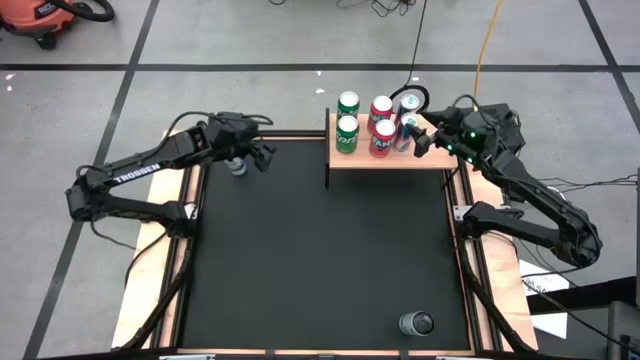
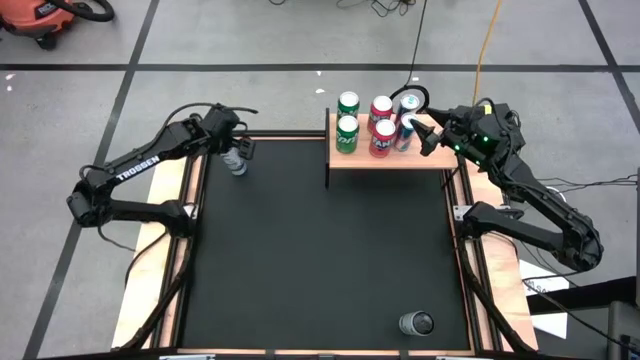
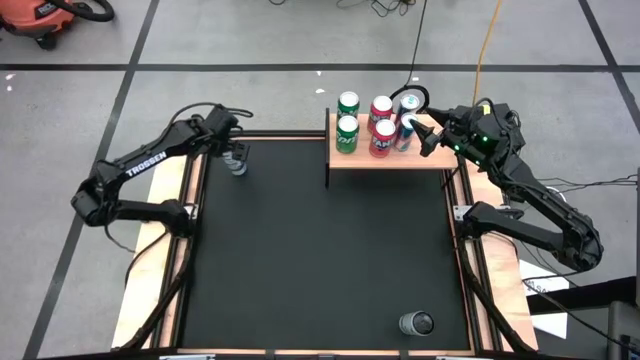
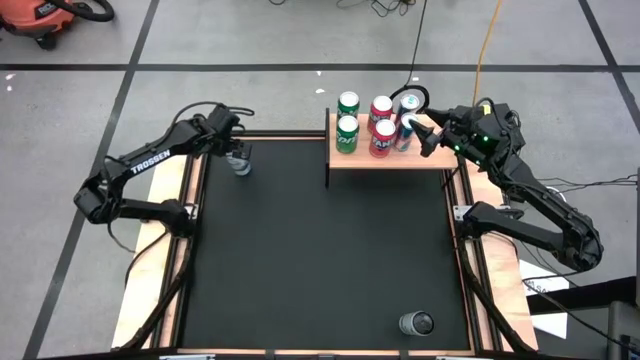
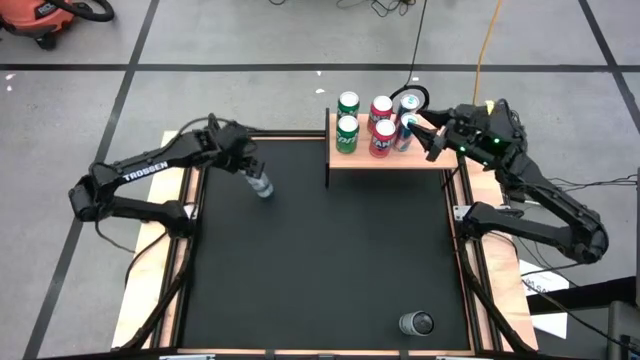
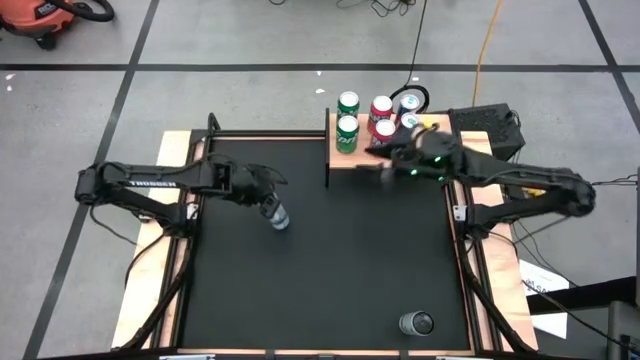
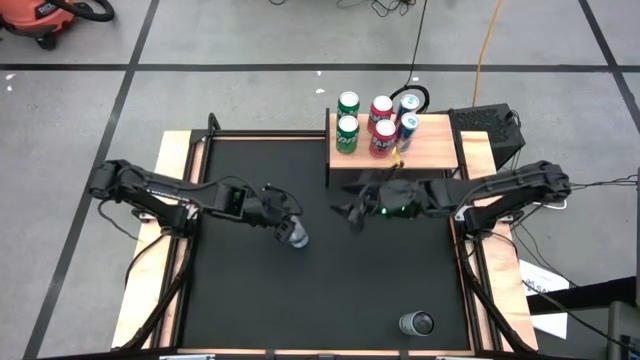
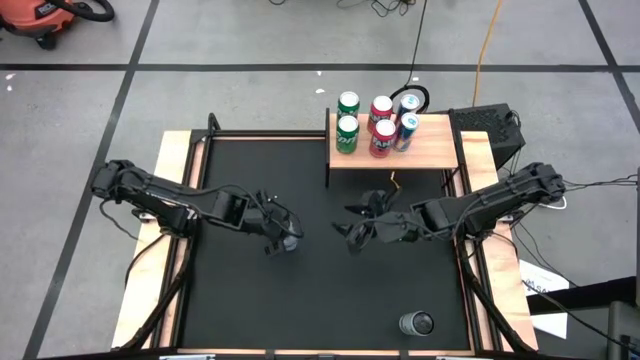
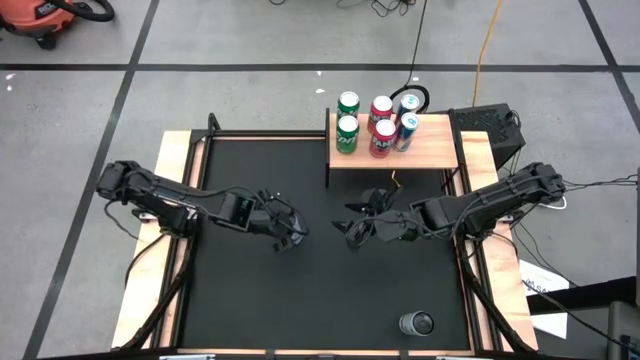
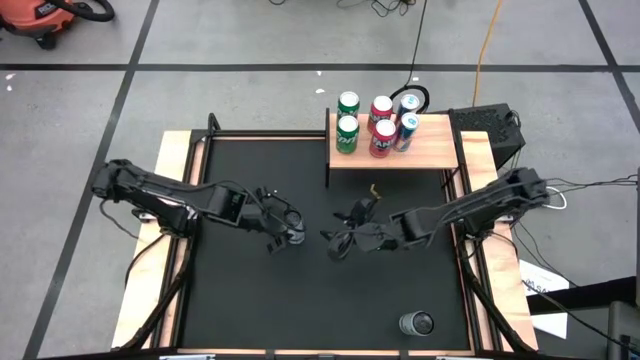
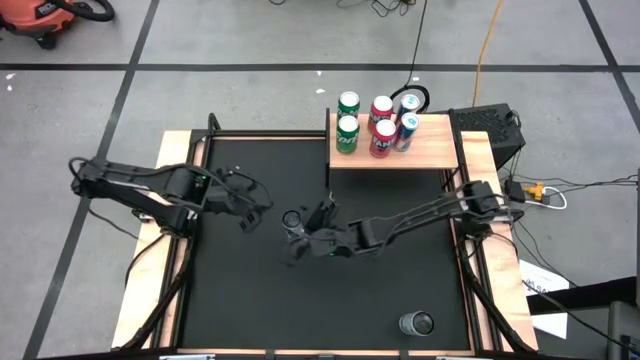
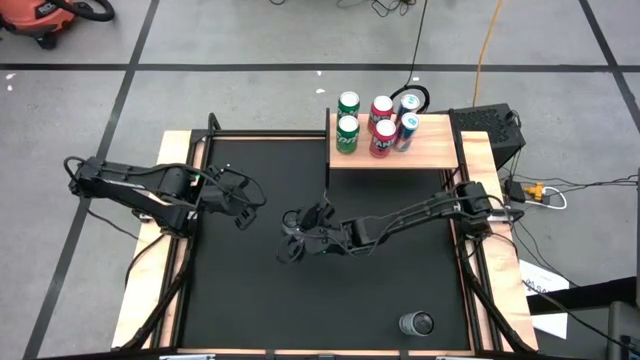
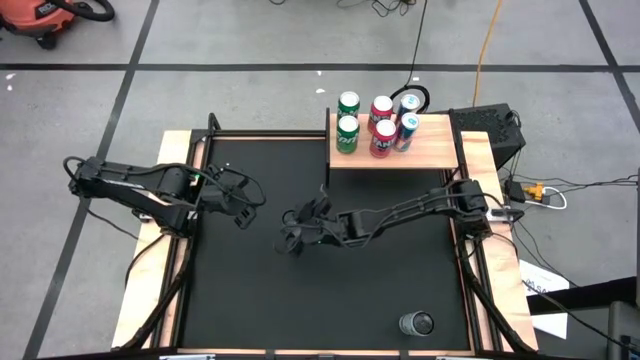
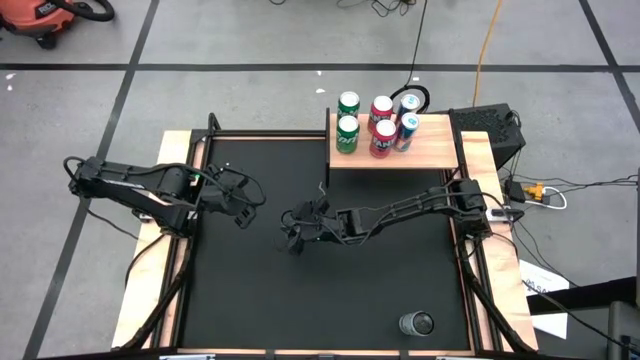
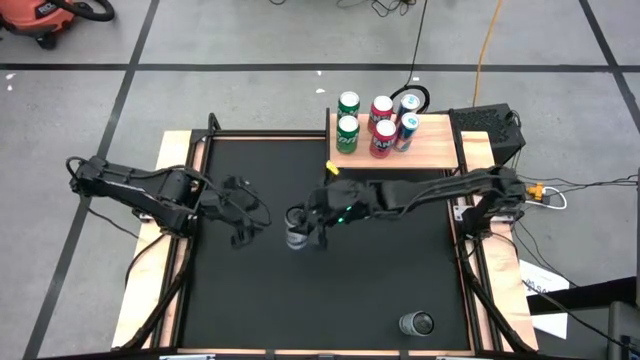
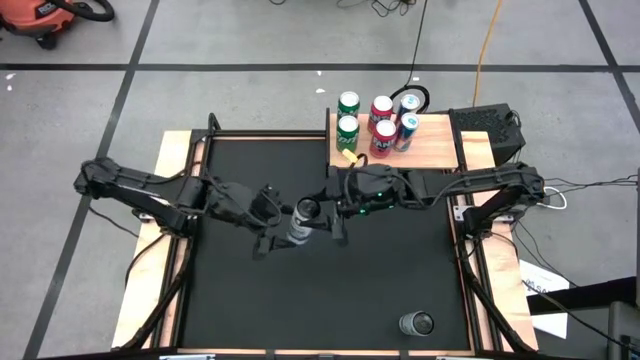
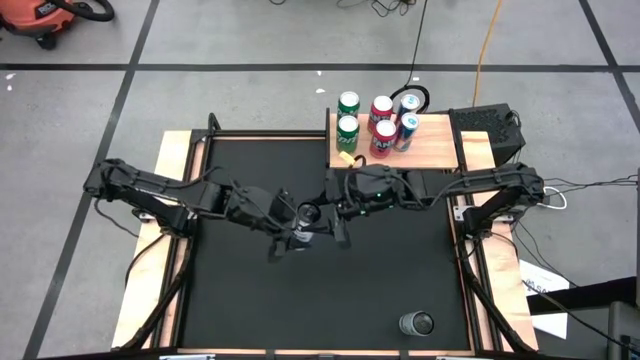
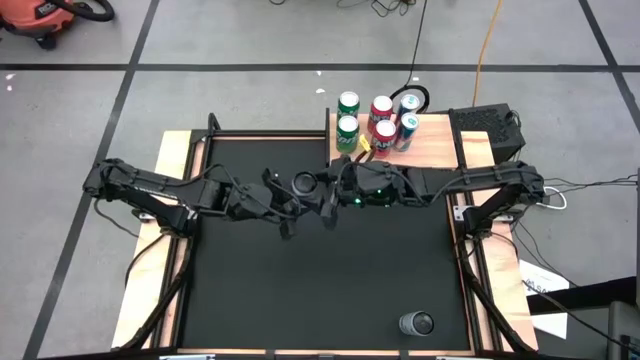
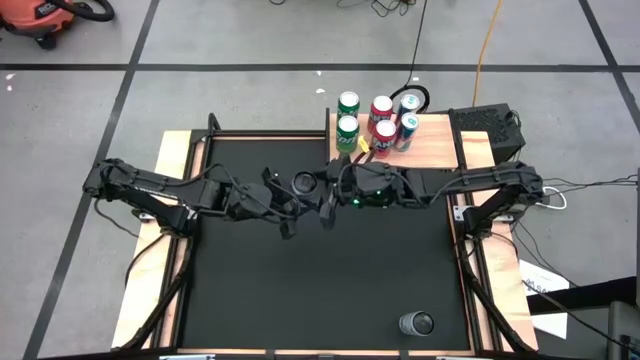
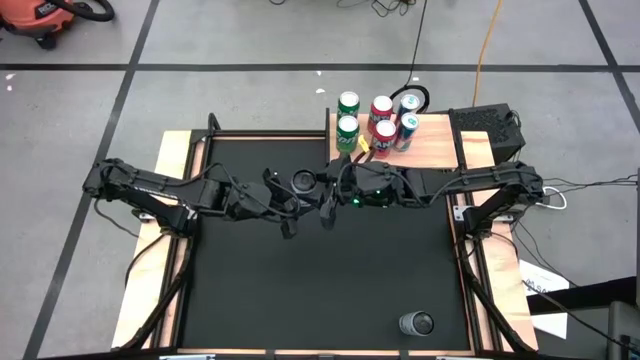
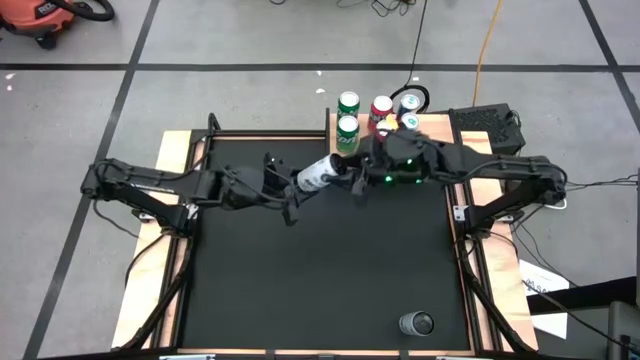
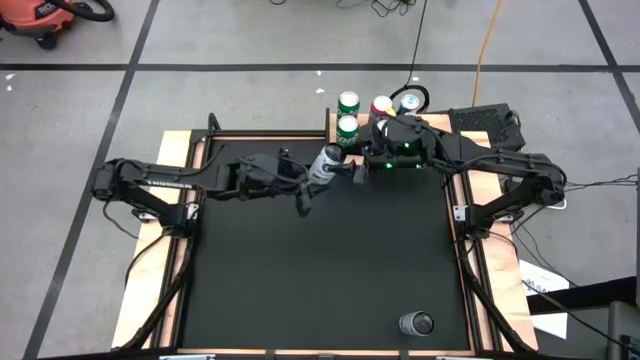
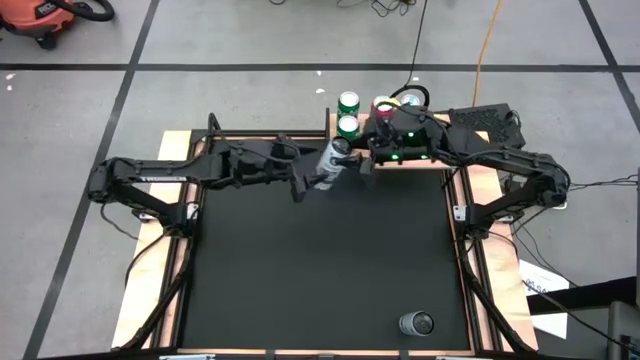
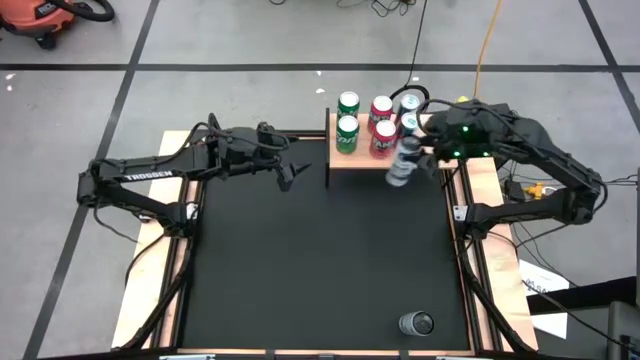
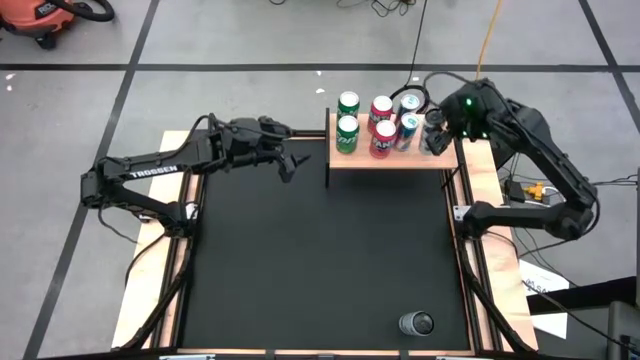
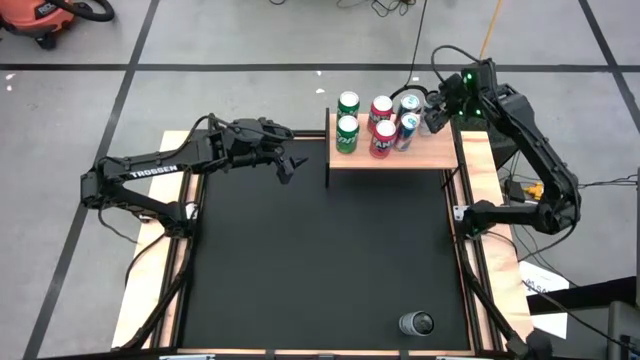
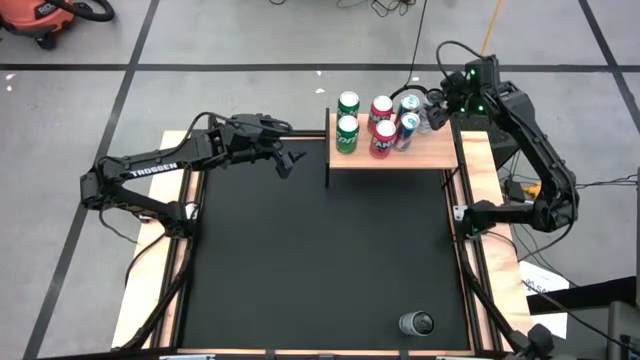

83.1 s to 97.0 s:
Task: Place canned beverage on shelf
Put the top white-blue soda can on the shelf

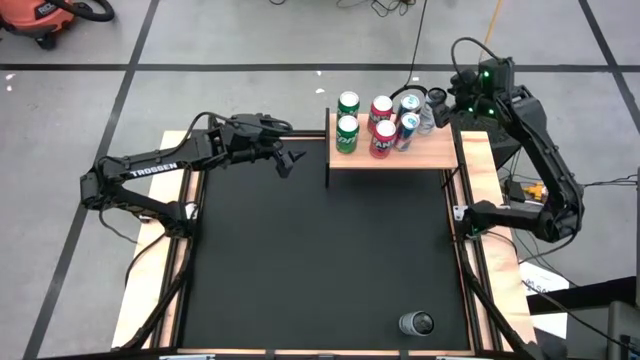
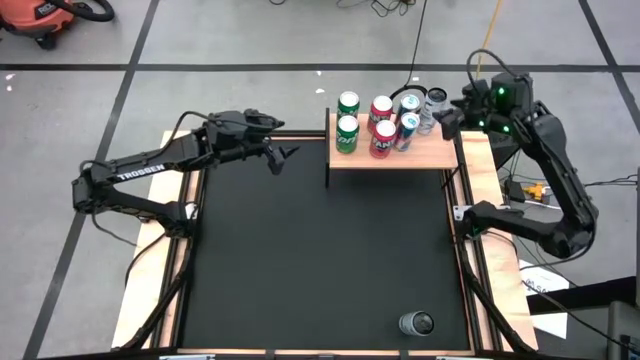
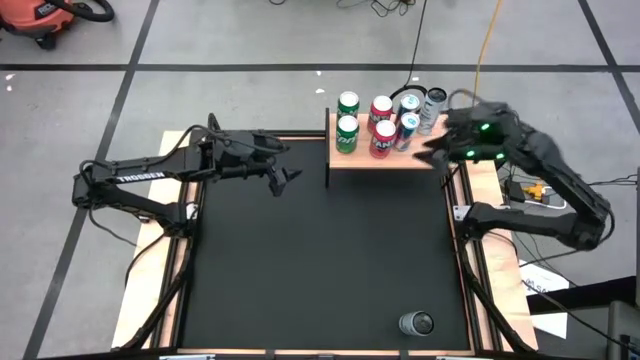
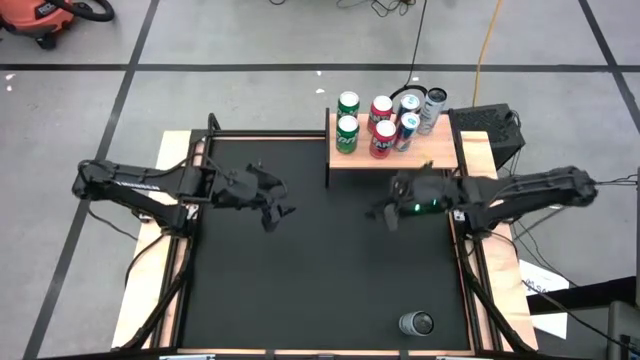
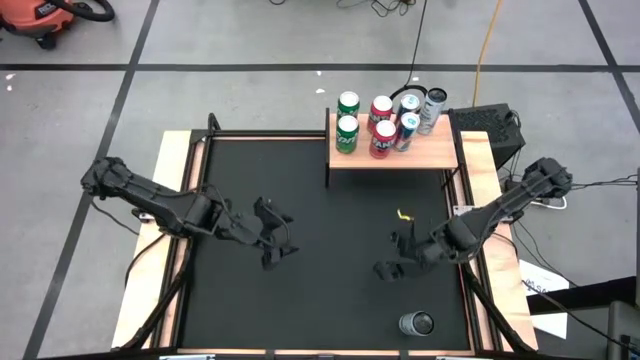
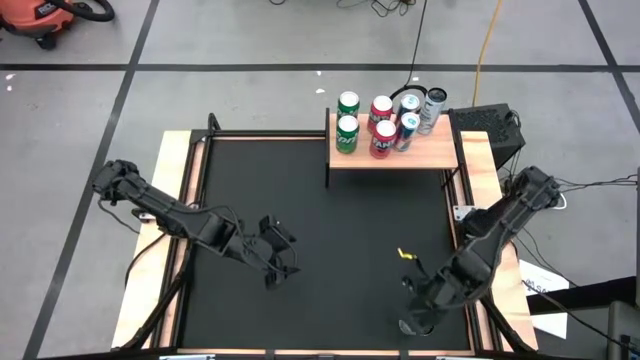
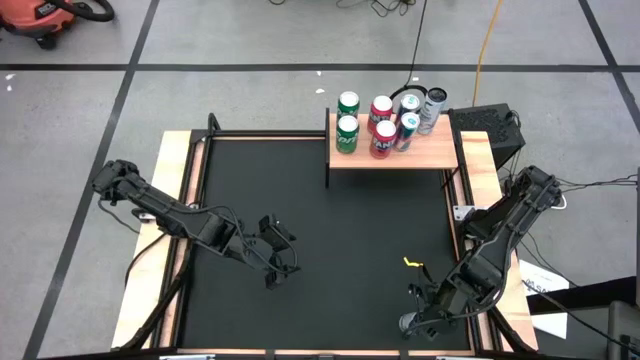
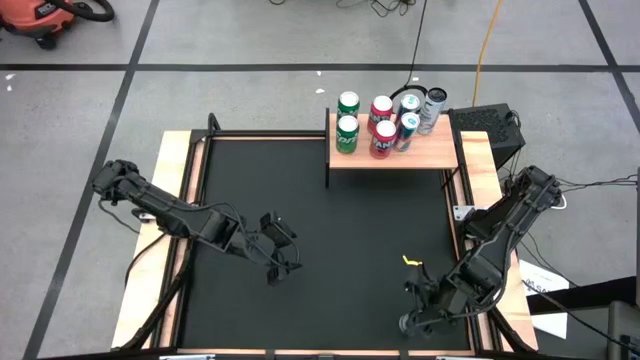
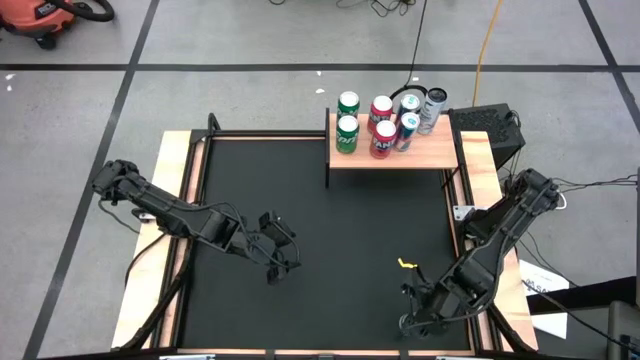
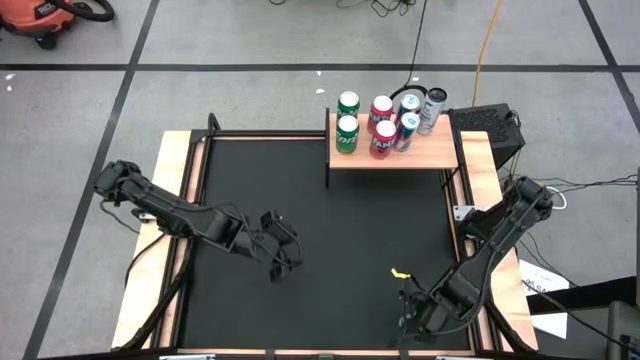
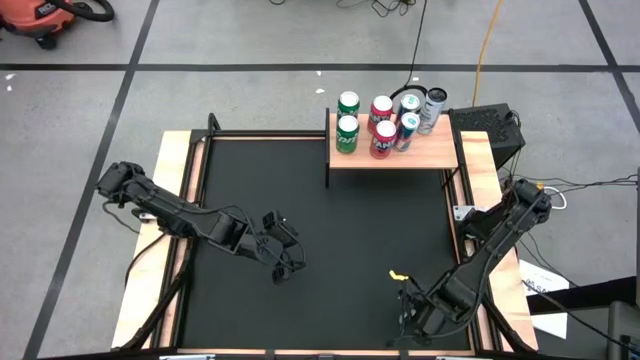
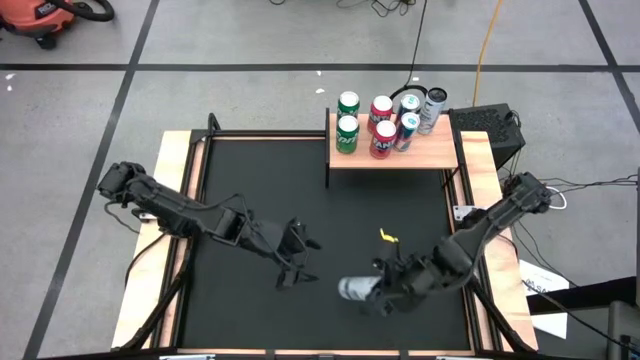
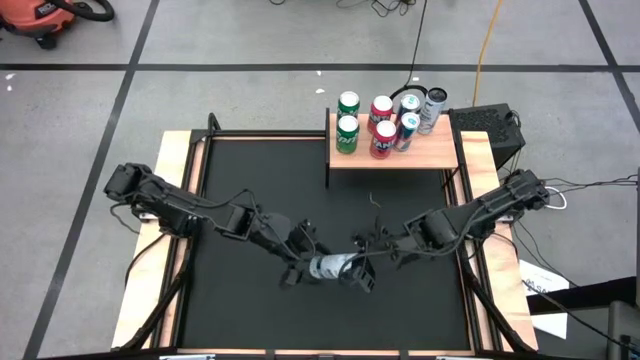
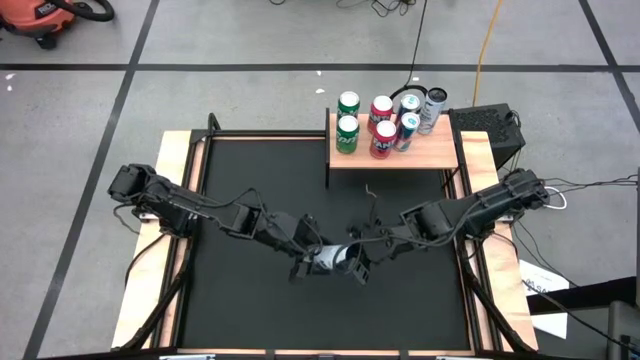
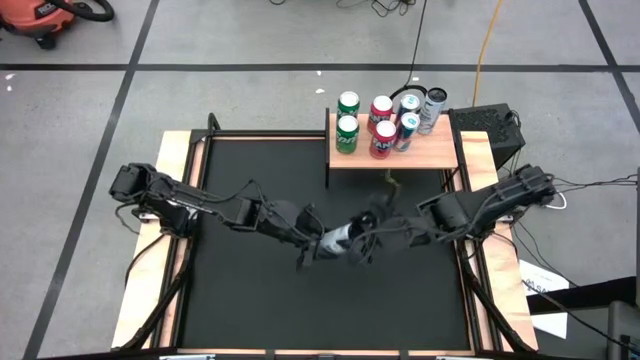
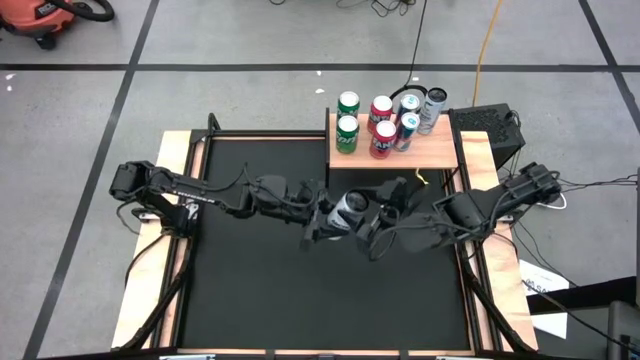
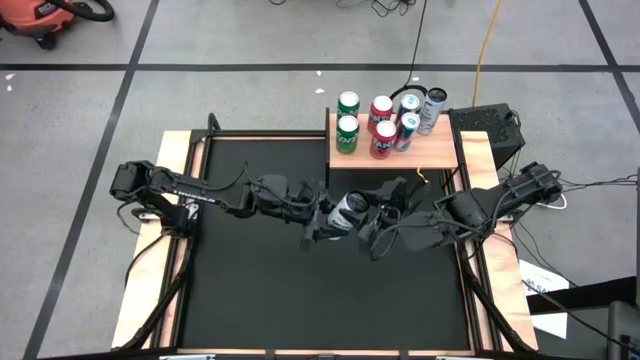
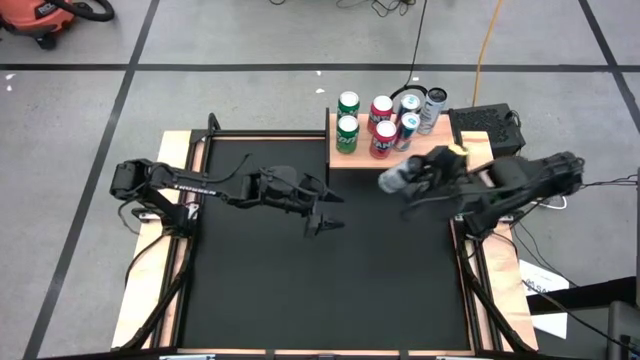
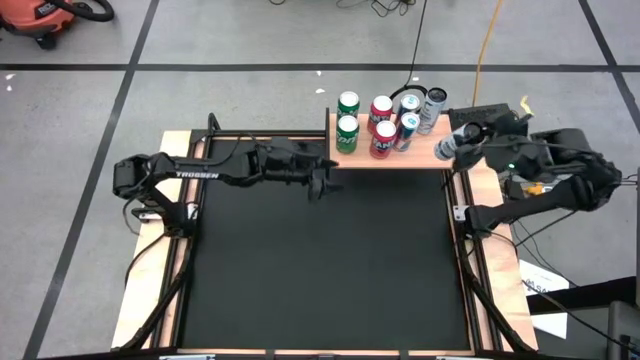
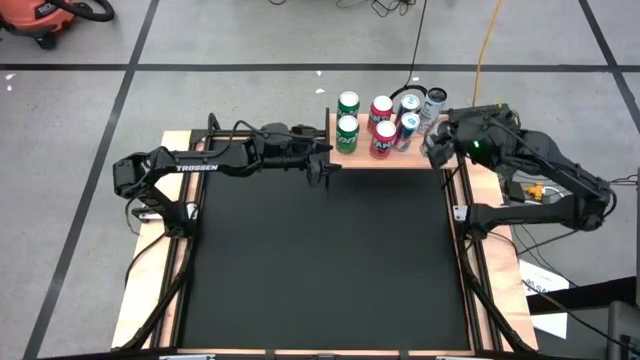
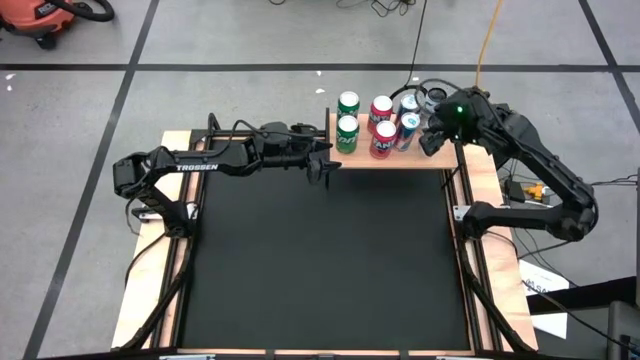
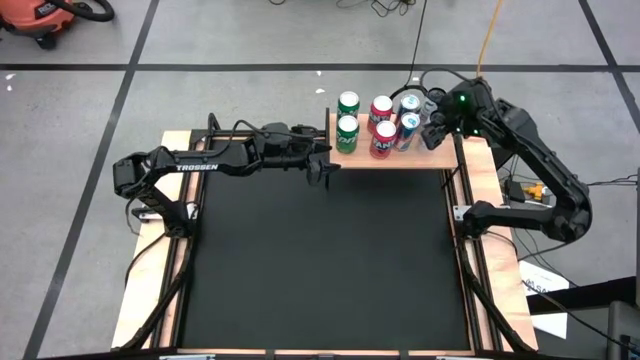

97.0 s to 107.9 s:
Put the white-blue soda can on the shelf aligned with the other white-blue soda can
